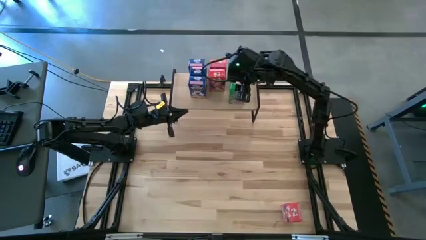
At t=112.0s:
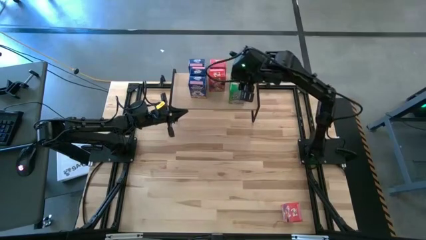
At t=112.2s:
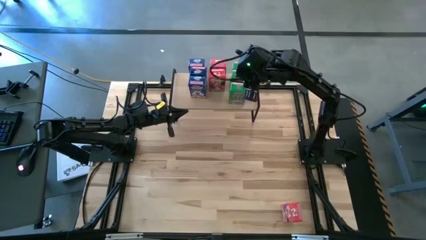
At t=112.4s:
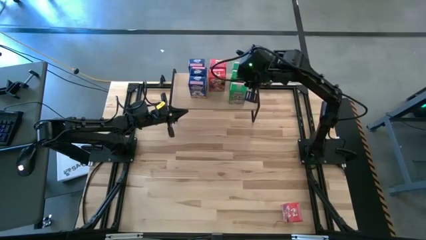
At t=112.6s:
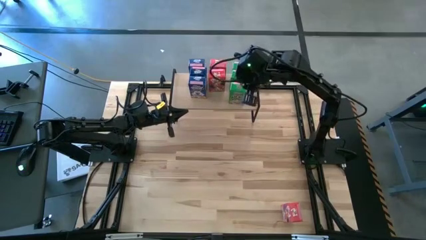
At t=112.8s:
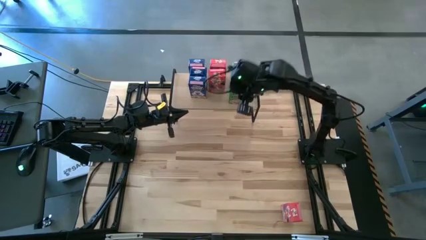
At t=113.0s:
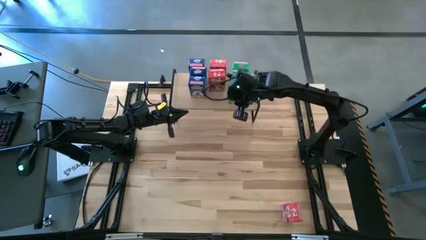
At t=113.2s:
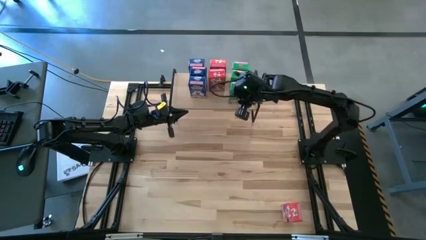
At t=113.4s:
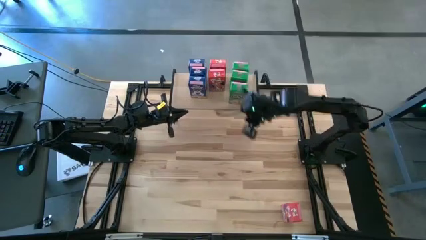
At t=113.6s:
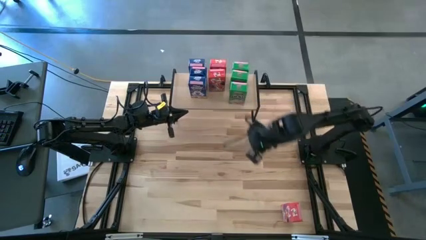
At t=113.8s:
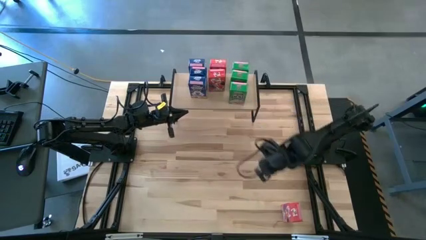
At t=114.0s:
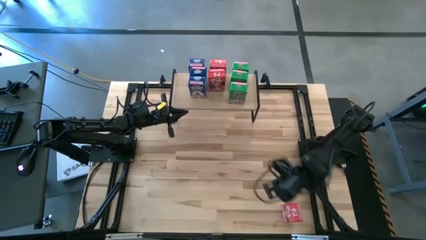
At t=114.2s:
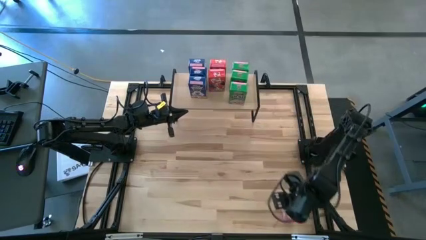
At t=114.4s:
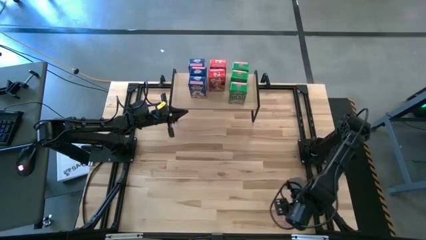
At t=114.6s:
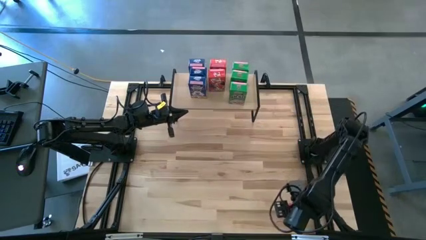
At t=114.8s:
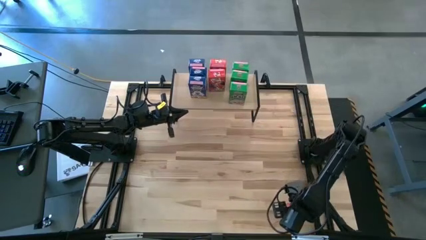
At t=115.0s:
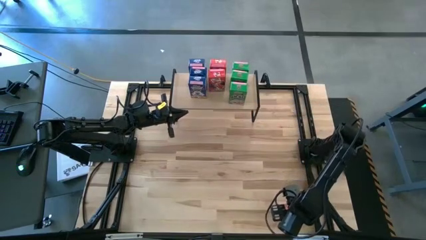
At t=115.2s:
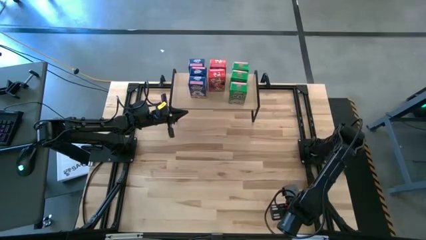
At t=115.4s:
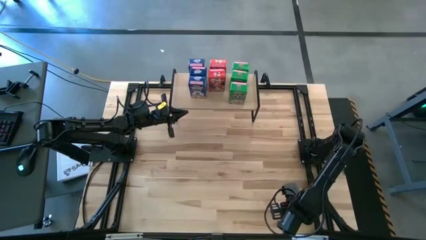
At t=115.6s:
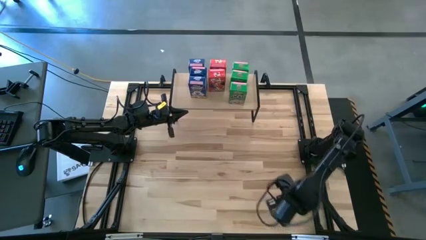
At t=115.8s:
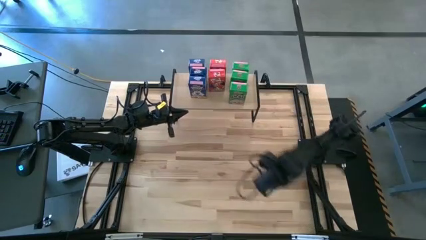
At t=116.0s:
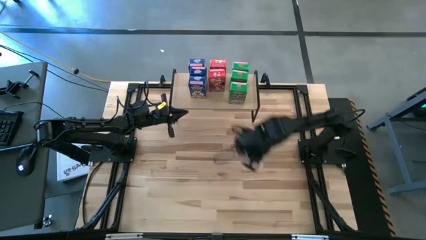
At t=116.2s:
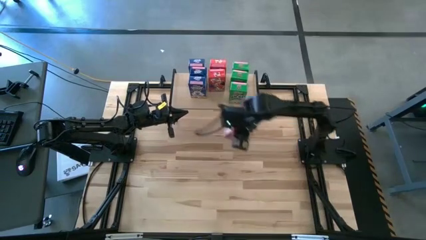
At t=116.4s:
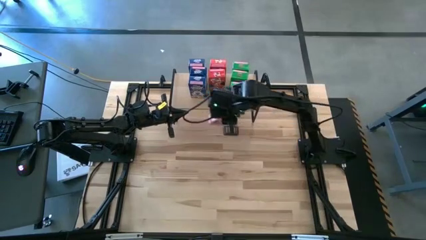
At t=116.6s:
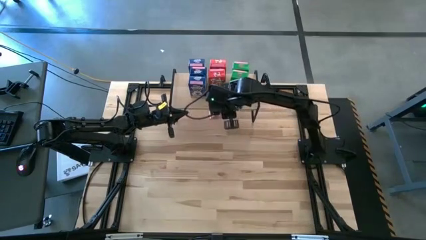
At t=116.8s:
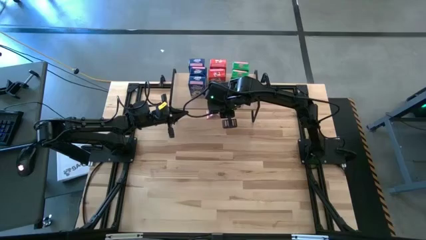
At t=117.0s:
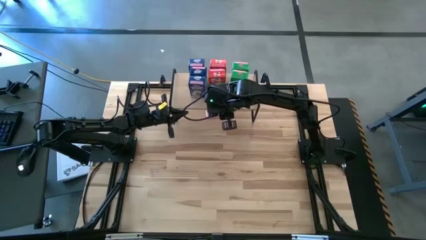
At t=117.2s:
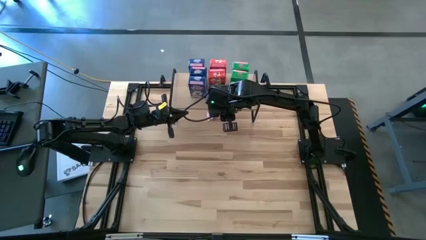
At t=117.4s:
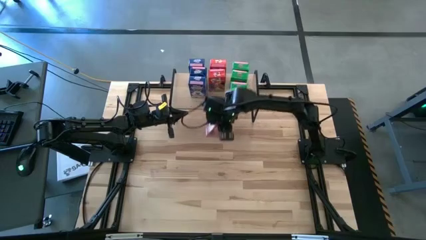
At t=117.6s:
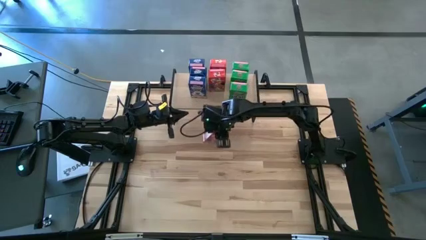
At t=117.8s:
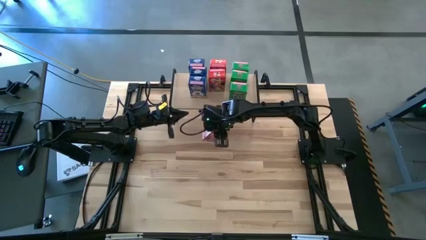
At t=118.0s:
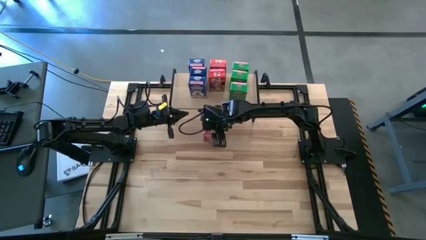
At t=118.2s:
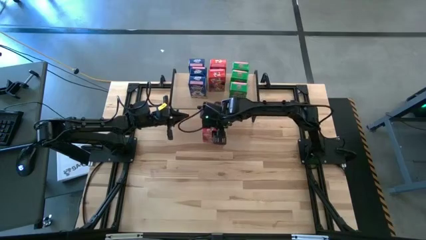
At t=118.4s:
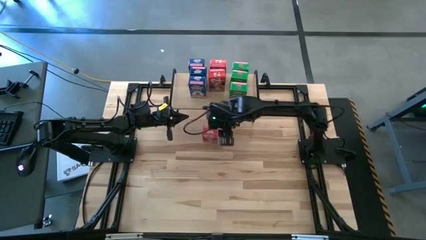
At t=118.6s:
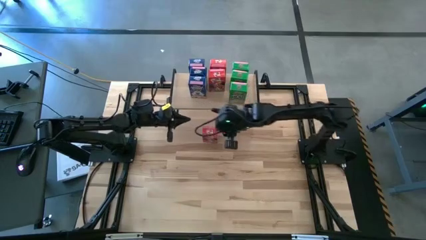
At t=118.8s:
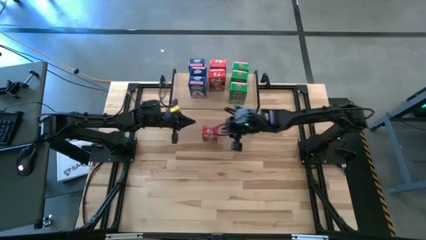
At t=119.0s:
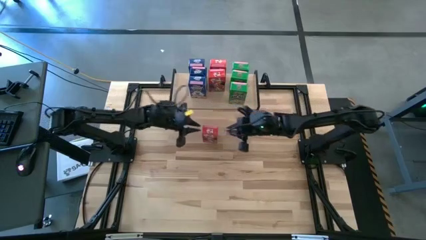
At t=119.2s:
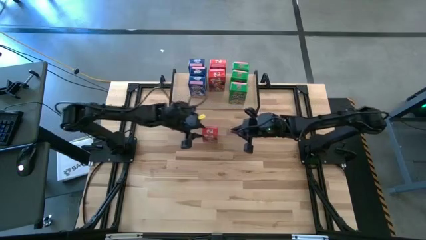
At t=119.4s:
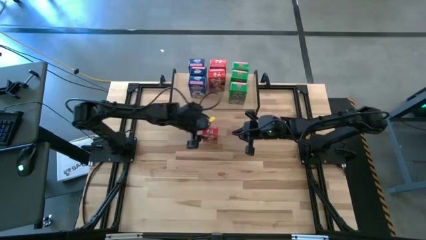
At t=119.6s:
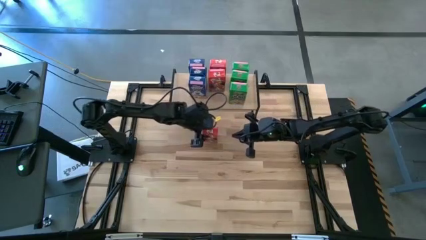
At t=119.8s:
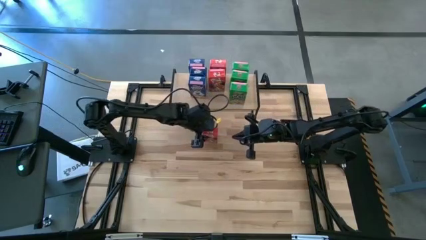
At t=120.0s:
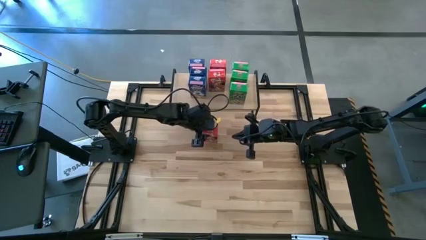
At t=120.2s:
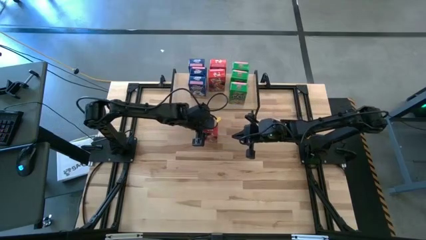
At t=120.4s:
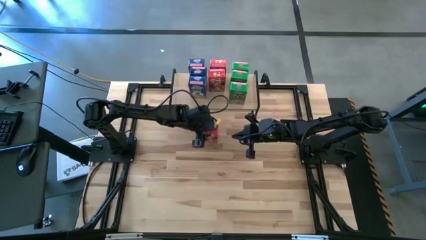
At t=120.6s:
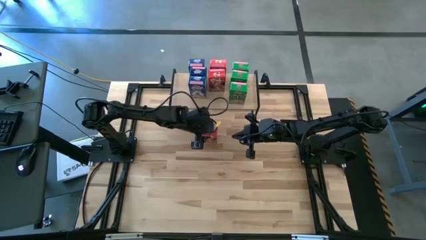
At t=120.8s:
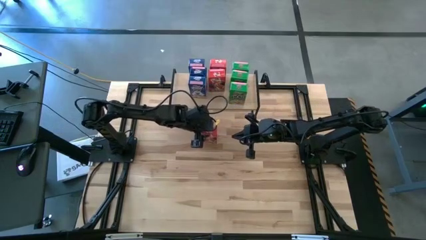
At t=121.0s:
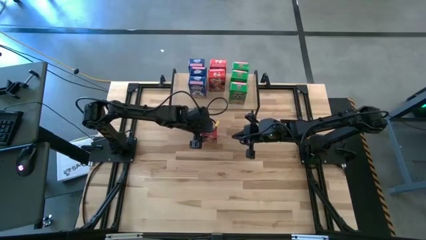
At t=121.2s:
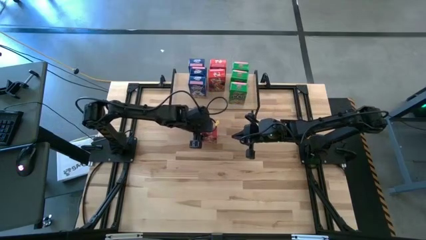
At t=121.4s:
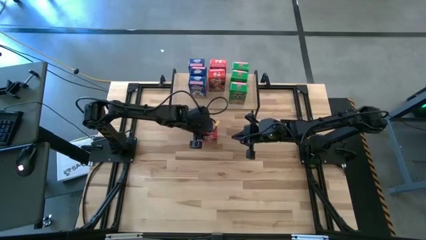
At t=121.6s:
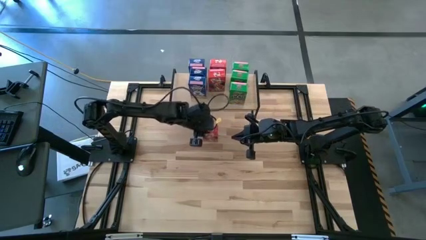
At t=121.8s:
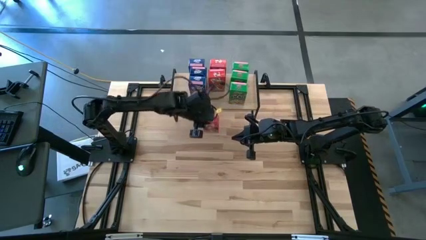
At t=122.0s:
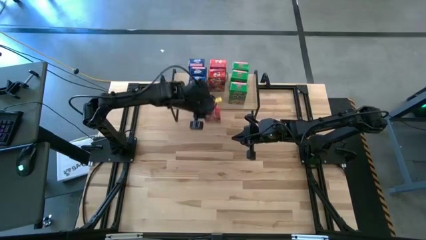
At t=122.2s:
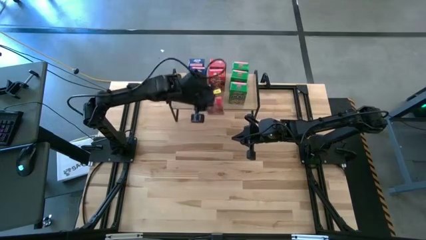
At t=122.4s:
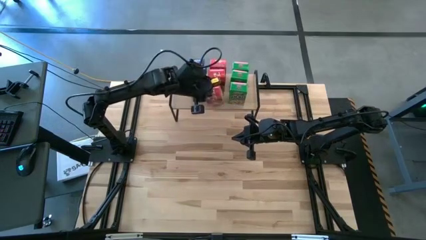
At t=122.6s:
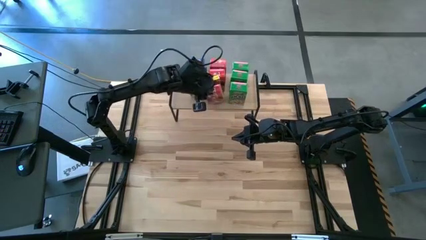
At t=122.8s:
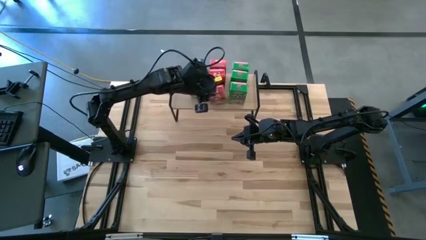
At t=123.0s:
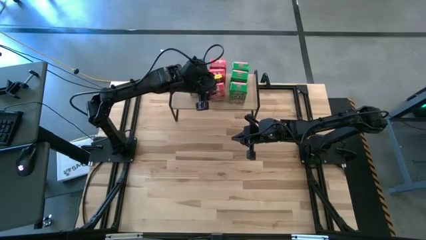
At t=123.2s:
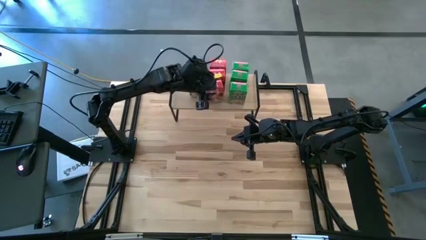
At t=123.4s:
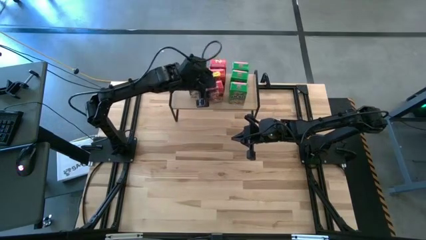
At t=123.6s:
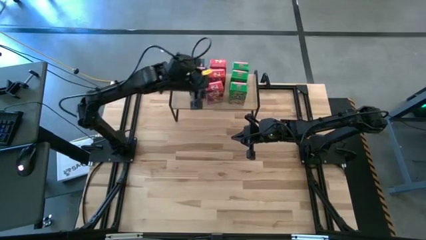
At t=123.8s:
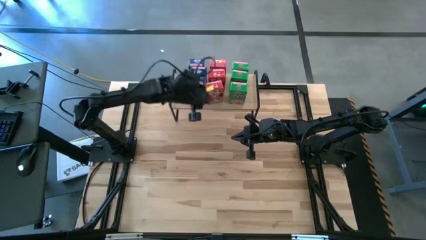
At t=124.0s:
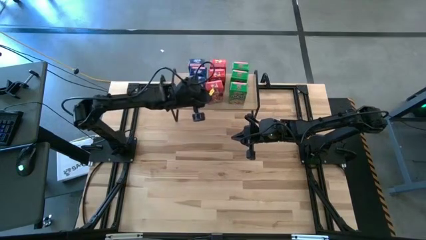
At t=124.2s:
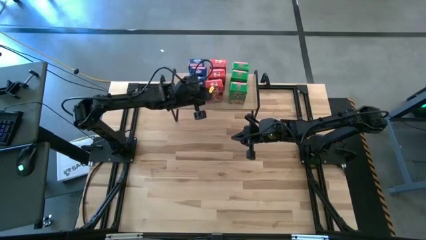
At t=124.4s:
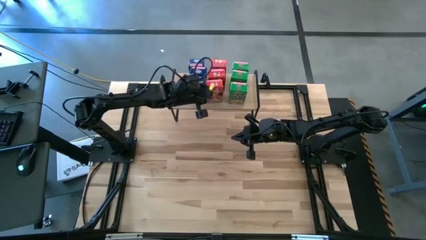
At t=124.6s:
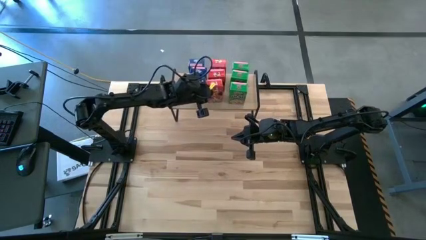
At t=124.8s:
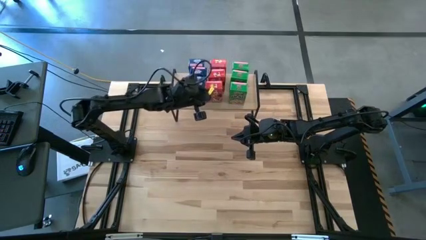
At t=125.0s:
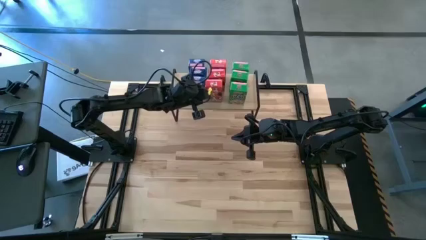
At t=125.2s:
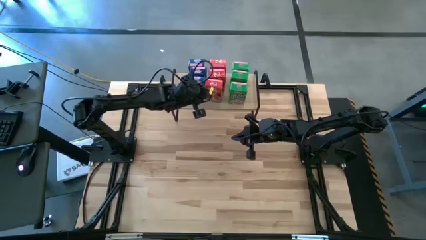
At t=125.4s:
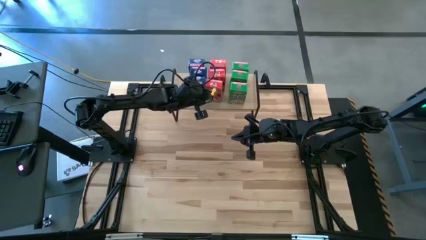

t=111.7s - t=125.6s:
Task: Stack cereal on shelf
Put the red cereal box aligned with the other red cereal box on the shelf
